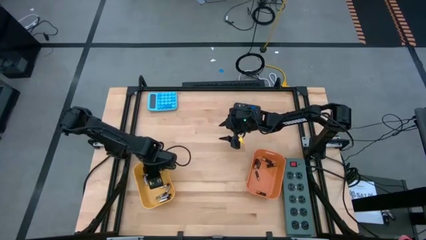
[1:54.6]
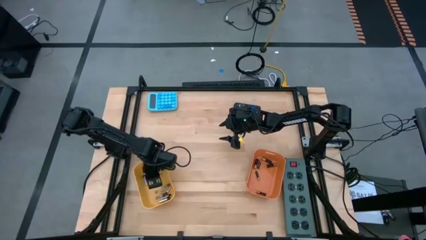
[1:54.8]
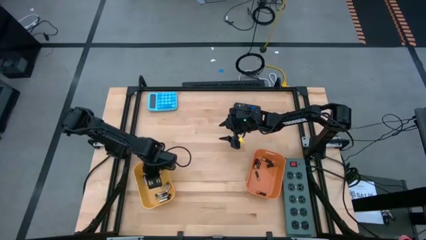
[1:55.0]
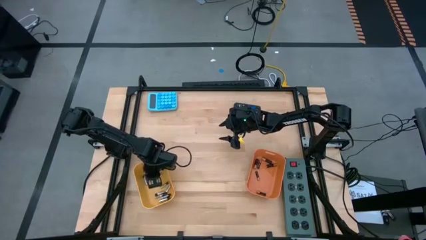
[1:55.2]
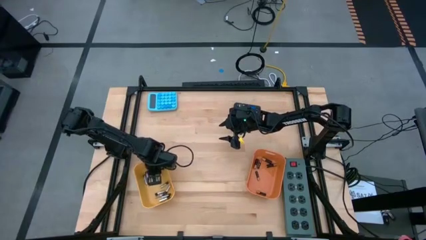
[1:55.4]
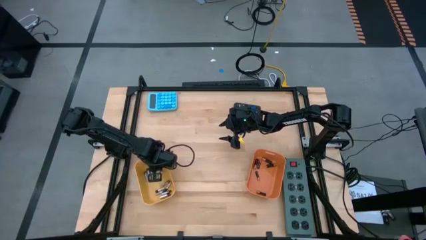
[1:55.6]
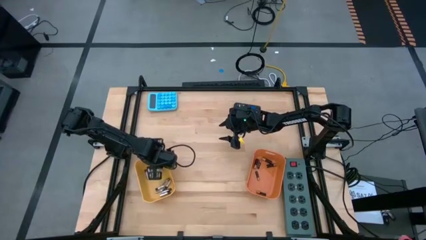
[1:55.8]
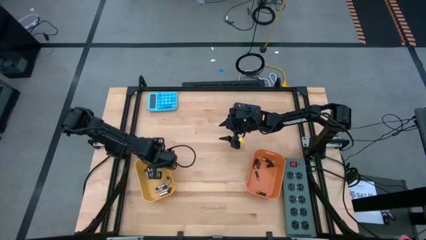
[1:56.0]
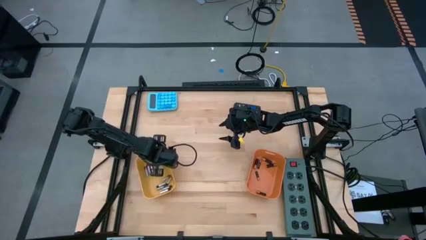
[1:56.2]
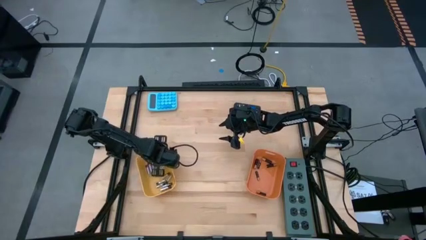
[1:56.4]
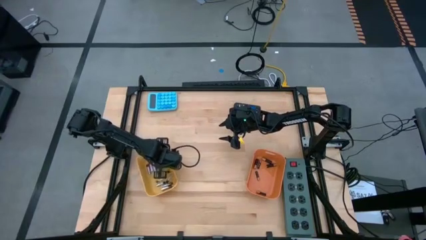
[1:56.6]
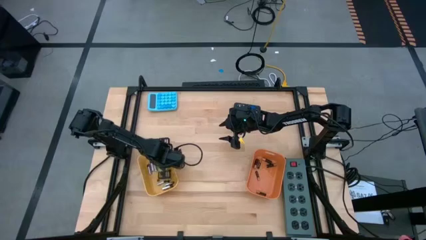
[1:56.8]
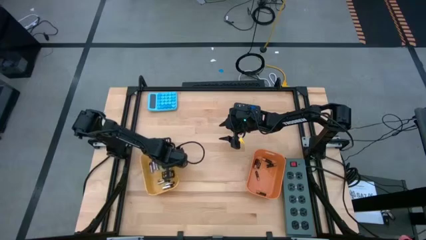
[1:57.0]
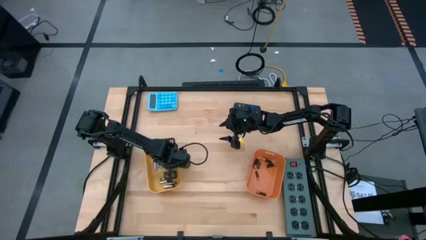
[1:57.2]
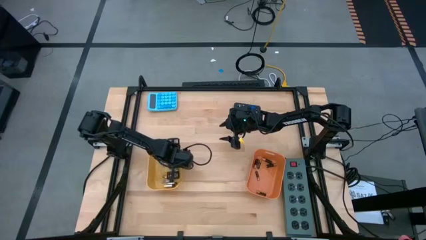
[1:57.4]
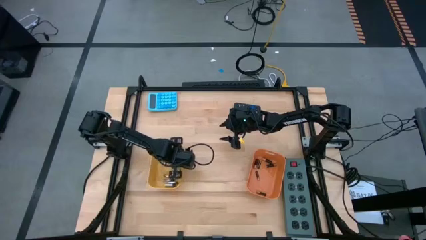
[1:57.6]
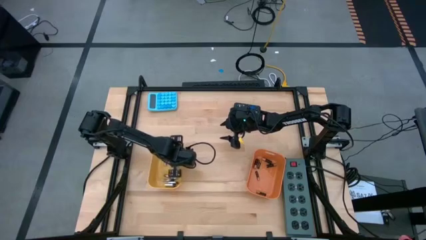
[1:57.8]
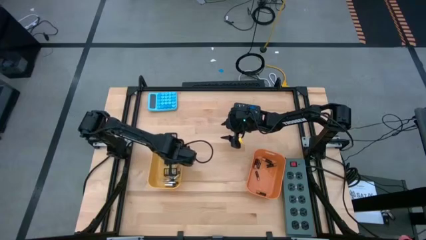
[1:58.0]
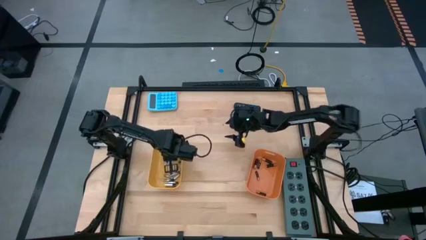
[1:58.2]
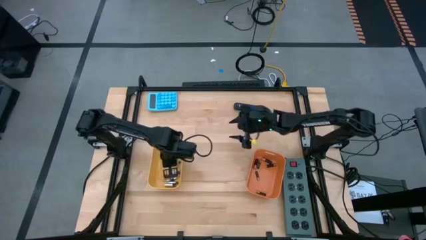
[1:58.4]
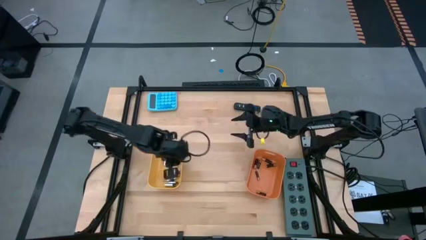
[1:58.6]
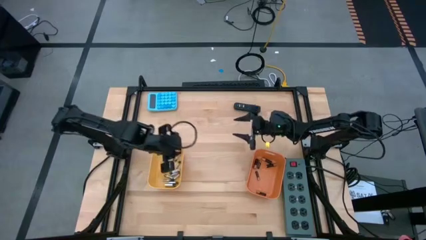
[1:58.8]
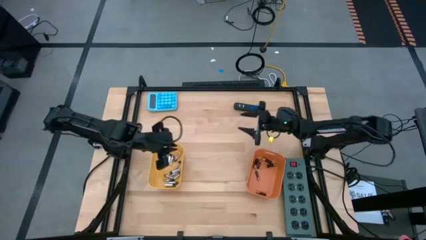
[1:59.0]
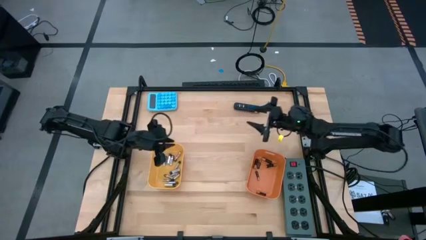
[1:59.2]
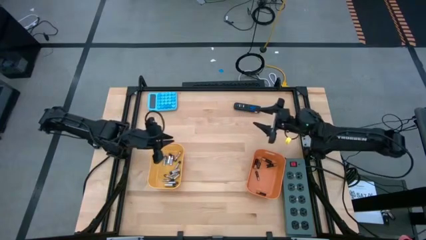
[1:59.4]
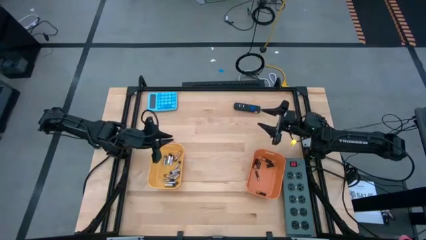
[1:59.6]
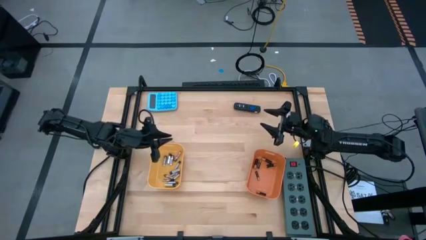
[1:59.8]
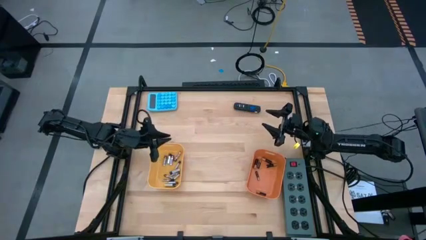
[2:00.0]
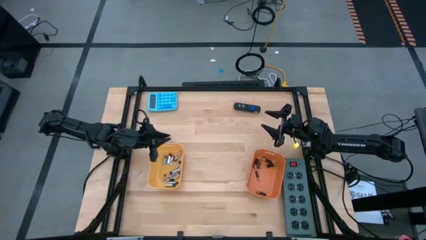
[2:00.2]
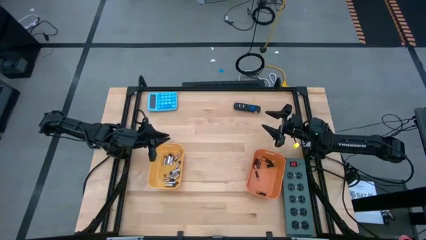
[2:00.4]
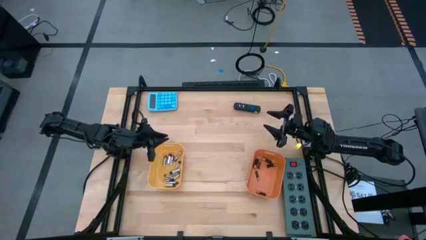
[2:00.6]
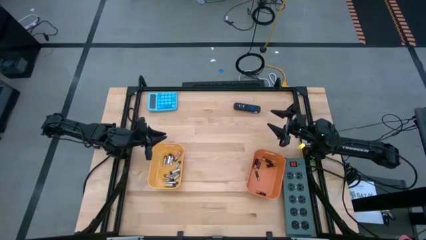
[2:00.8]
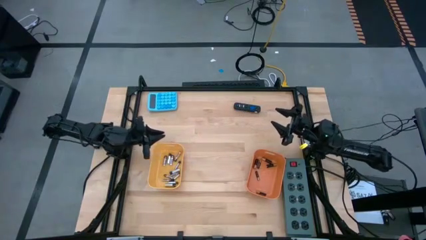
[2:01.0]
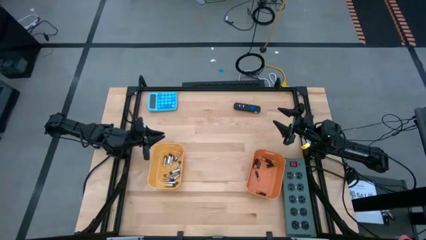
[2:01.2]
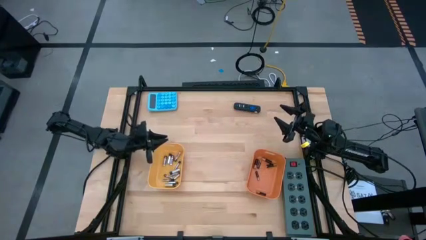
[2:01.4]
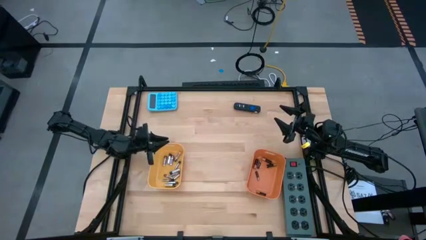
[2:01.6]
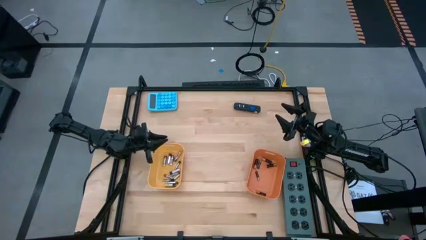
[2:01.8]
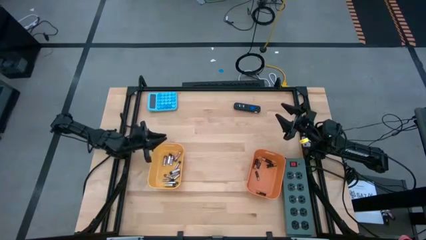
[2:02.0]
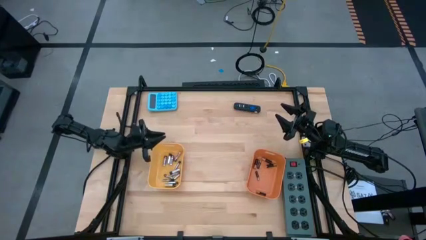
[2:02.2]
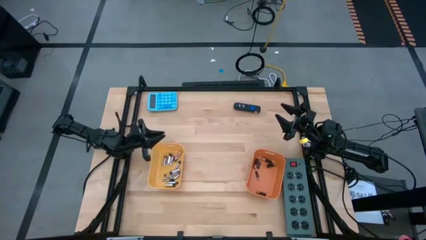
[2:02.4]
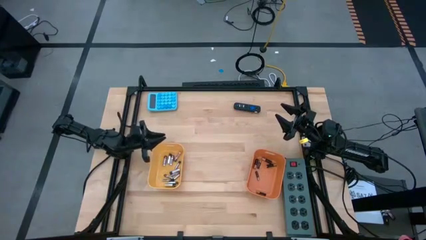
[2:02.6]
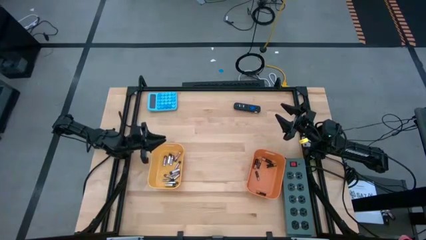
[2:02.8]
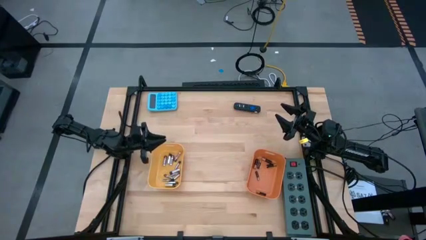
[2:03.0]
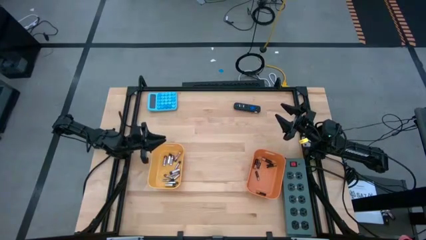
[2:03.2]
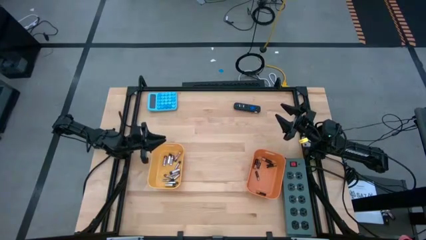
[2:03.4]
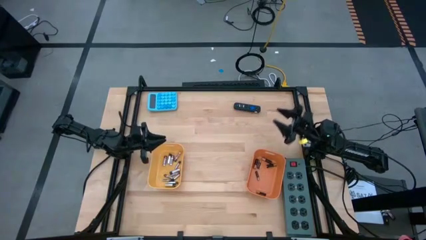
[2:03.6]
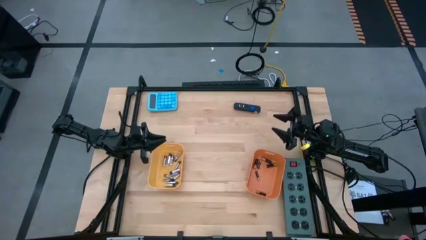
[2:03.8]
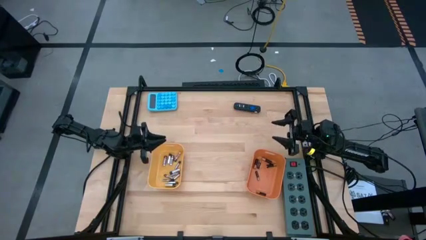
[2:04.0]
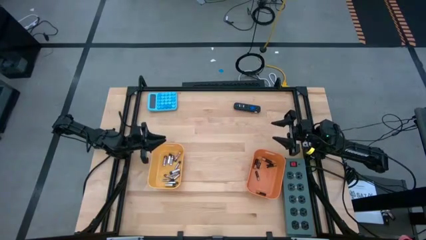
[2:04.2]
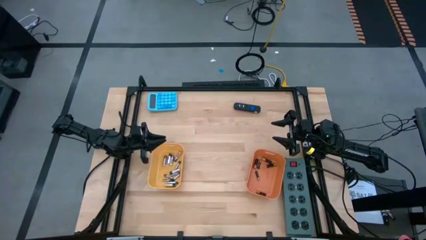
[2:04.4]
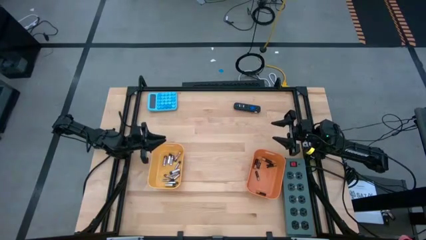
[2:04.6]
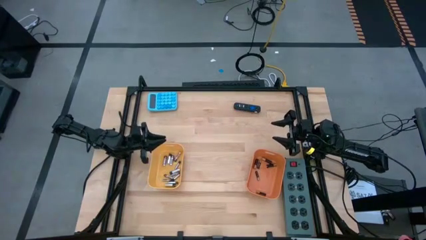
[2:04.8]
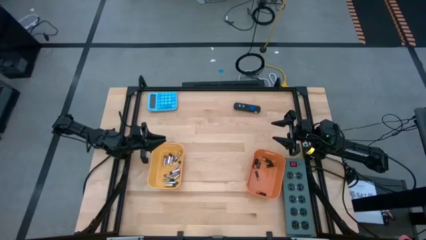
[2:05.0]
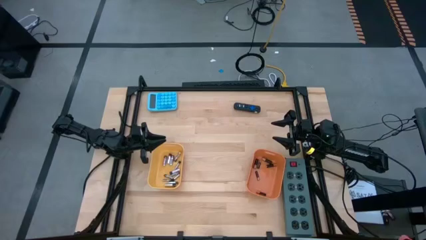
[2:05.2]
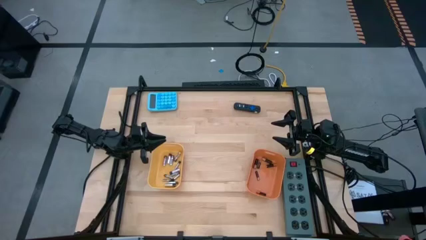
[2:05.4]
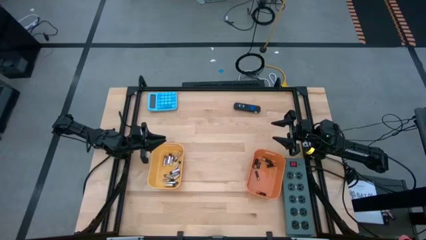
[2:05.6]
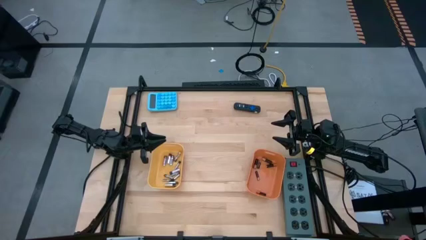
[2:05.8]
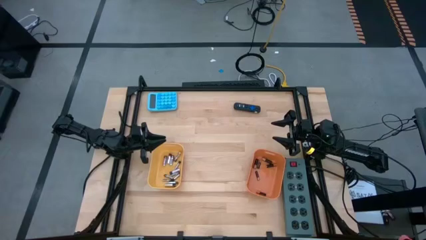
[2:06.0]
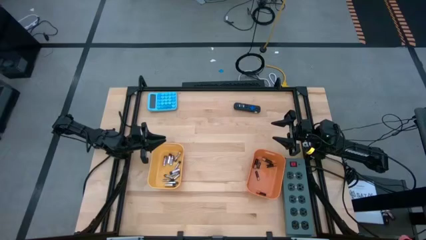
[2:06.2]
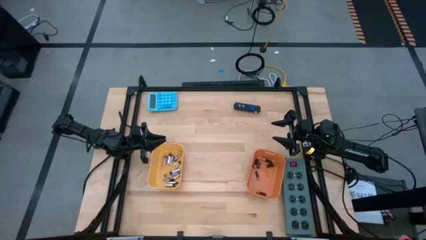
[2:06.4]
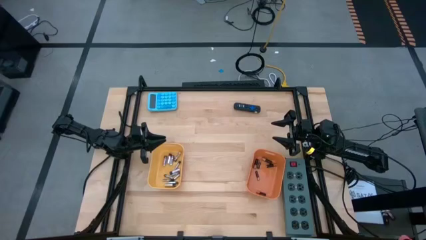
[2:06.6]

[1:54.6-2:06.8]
Task: Sort batteries
Return to Home Position
